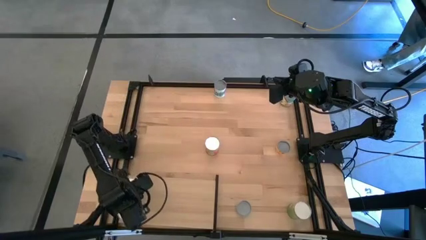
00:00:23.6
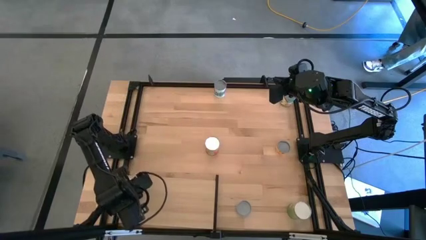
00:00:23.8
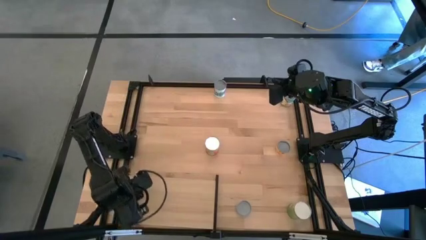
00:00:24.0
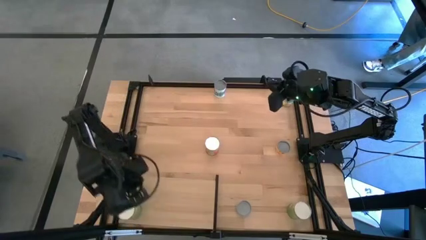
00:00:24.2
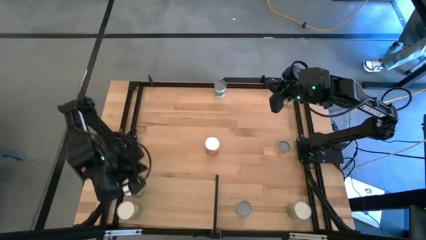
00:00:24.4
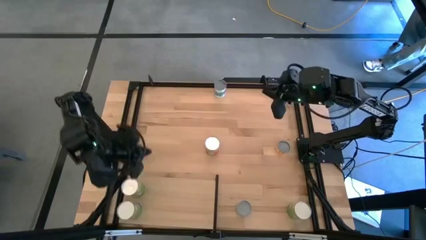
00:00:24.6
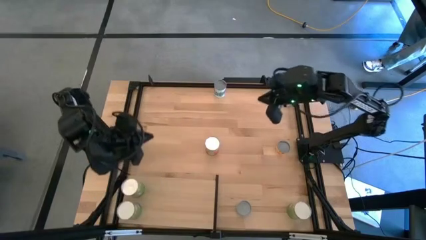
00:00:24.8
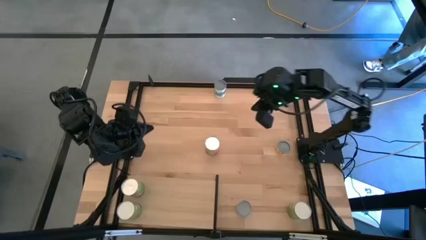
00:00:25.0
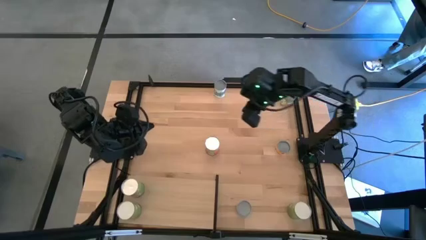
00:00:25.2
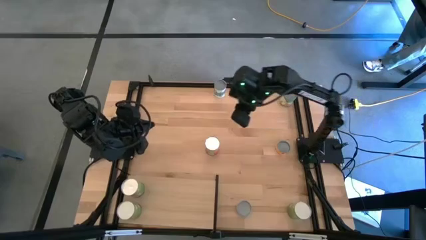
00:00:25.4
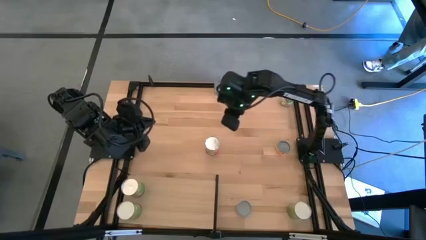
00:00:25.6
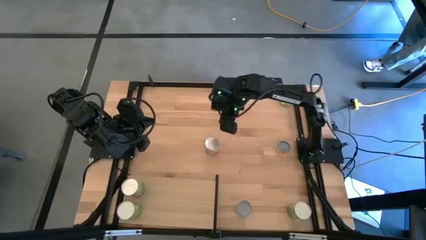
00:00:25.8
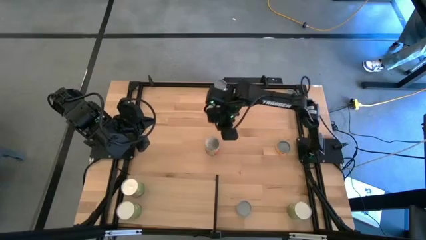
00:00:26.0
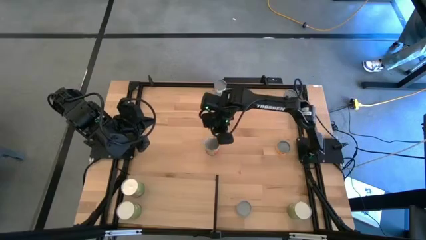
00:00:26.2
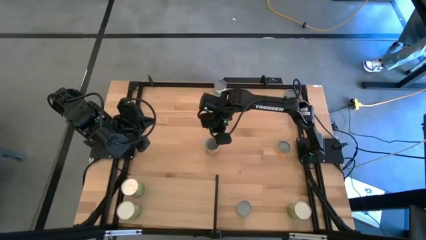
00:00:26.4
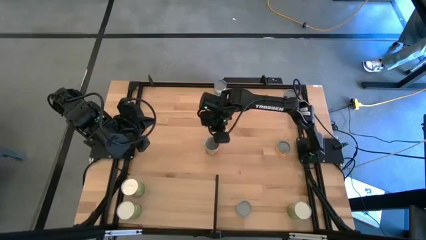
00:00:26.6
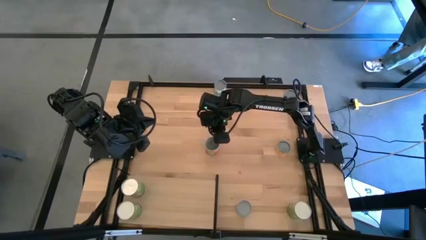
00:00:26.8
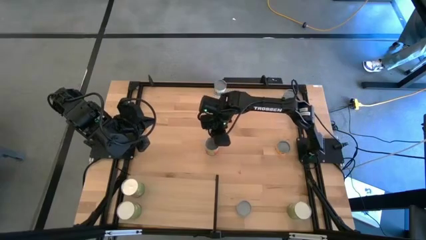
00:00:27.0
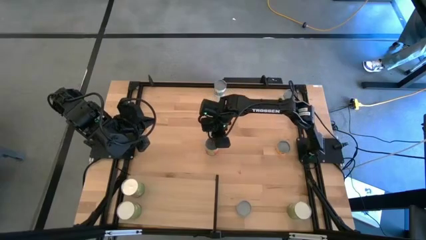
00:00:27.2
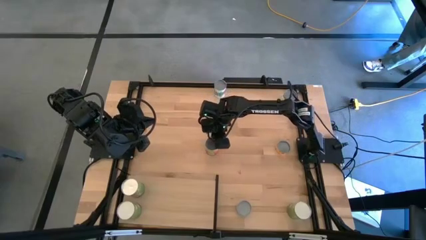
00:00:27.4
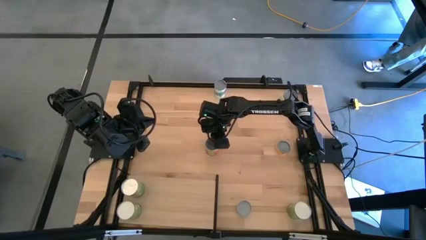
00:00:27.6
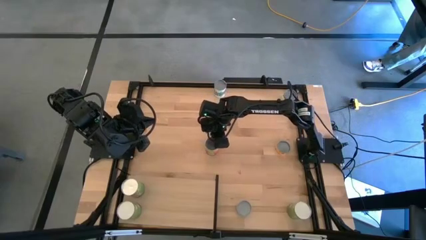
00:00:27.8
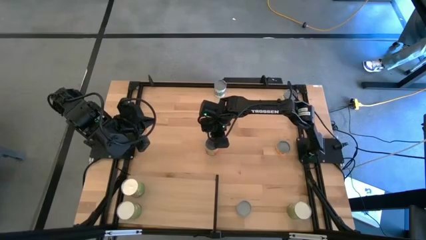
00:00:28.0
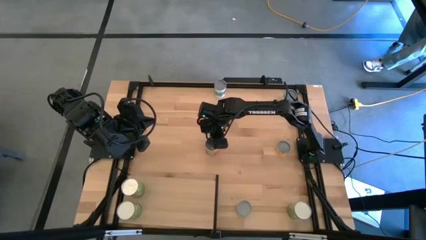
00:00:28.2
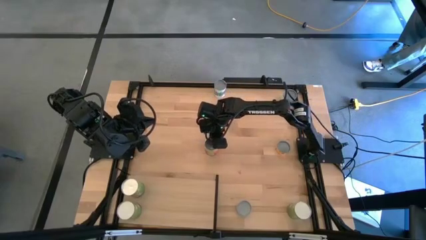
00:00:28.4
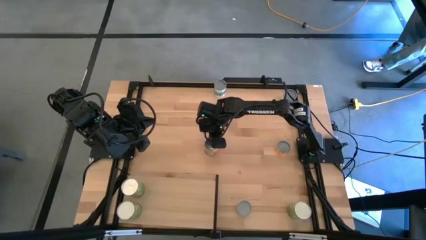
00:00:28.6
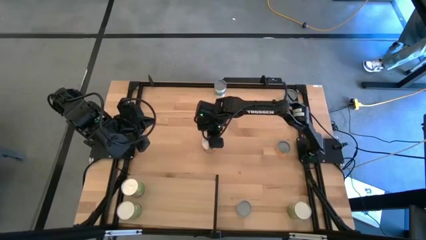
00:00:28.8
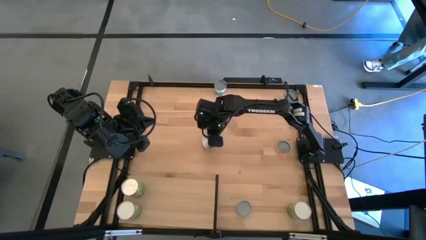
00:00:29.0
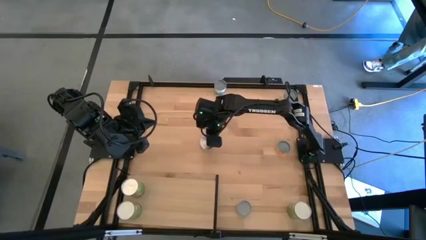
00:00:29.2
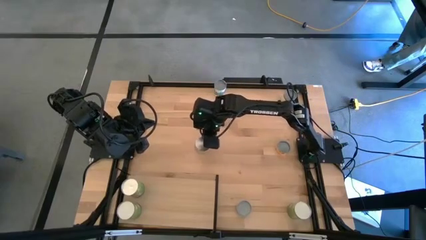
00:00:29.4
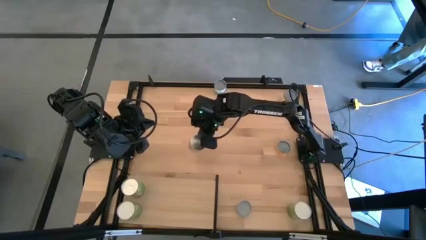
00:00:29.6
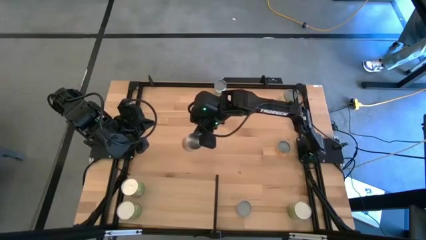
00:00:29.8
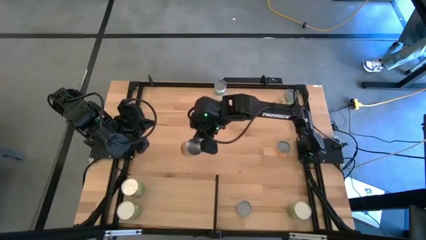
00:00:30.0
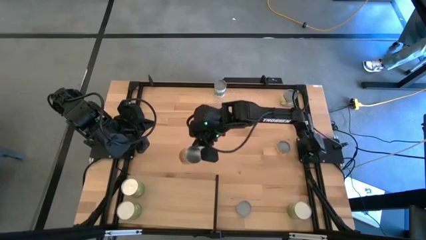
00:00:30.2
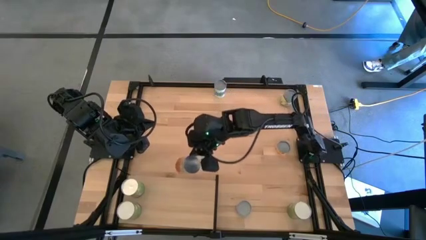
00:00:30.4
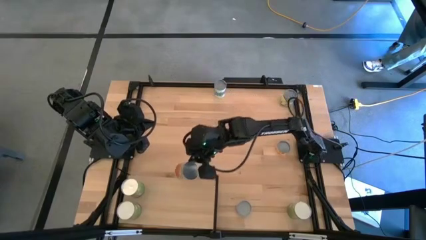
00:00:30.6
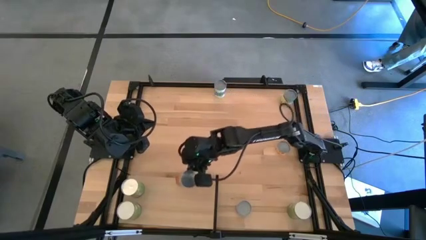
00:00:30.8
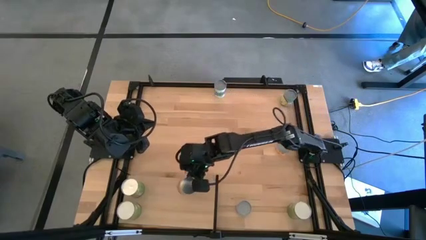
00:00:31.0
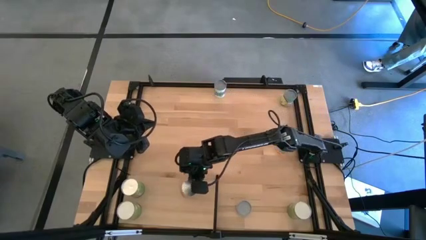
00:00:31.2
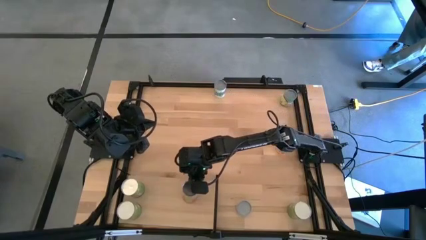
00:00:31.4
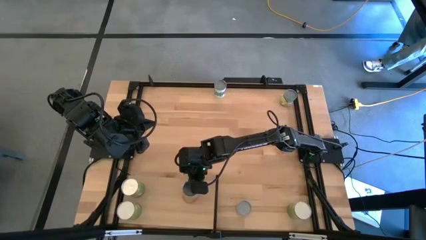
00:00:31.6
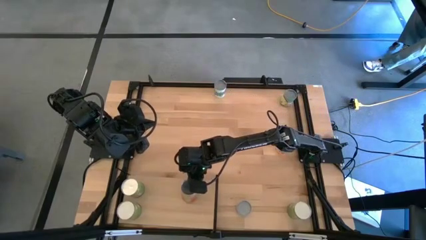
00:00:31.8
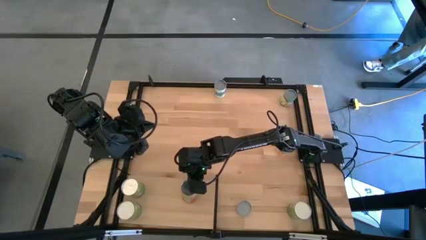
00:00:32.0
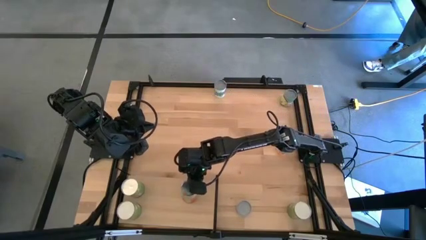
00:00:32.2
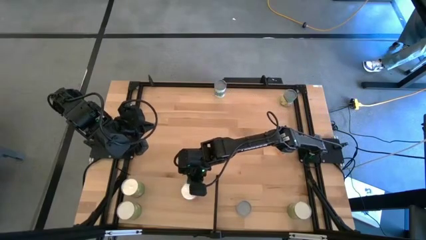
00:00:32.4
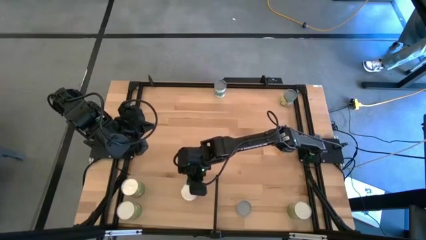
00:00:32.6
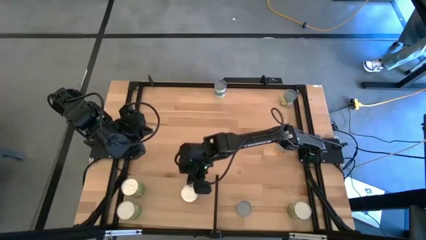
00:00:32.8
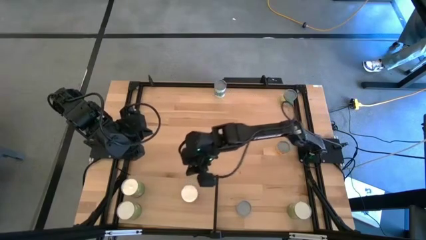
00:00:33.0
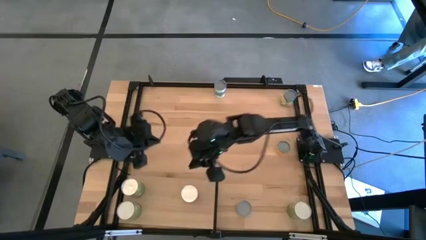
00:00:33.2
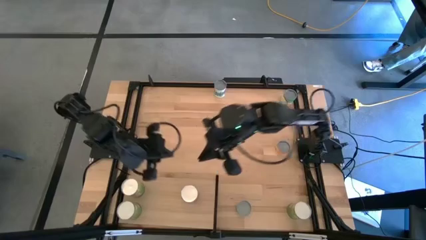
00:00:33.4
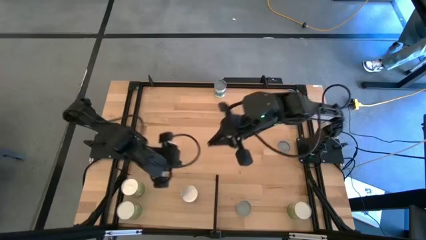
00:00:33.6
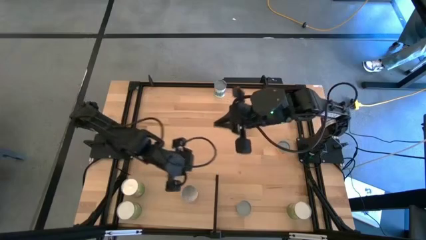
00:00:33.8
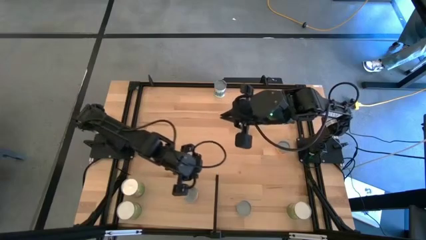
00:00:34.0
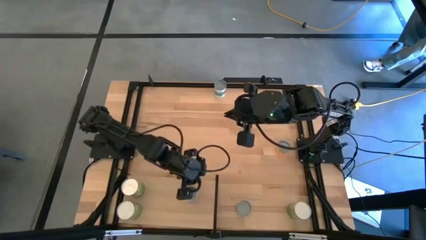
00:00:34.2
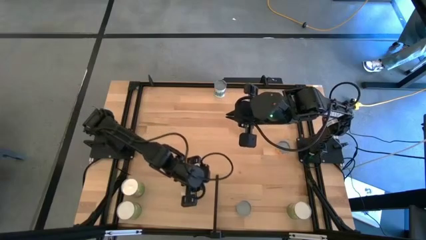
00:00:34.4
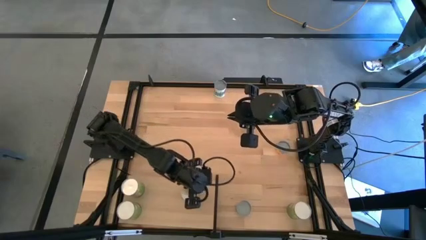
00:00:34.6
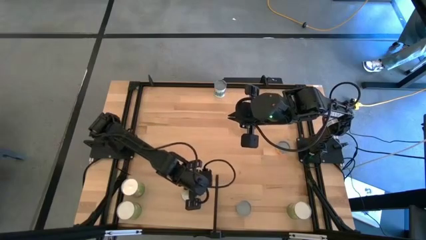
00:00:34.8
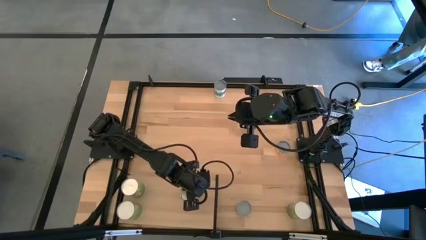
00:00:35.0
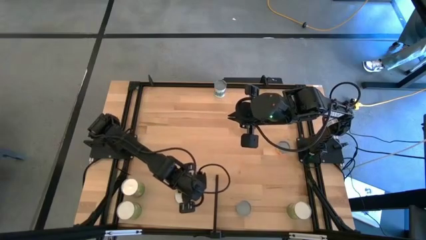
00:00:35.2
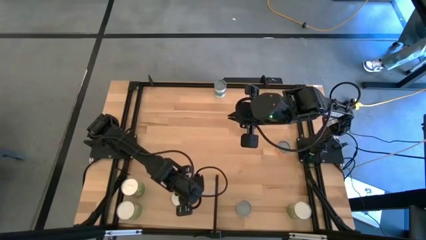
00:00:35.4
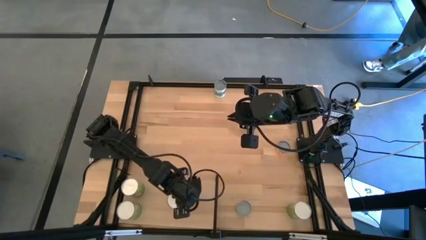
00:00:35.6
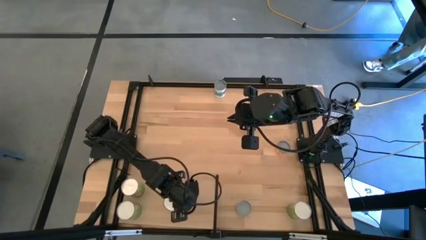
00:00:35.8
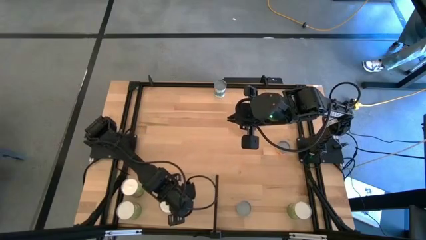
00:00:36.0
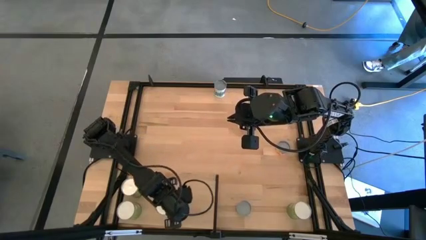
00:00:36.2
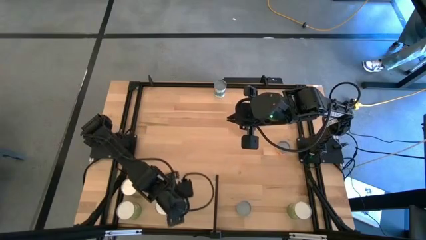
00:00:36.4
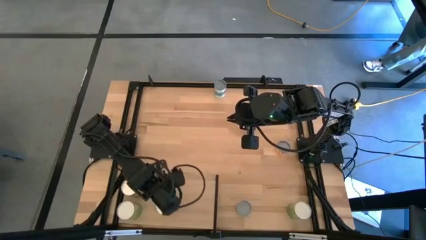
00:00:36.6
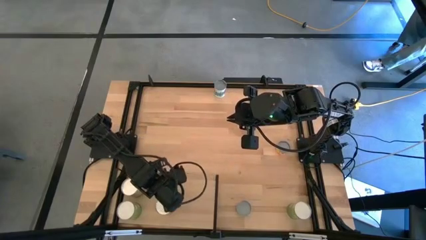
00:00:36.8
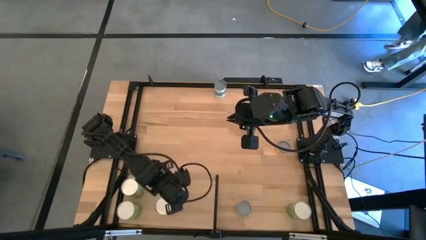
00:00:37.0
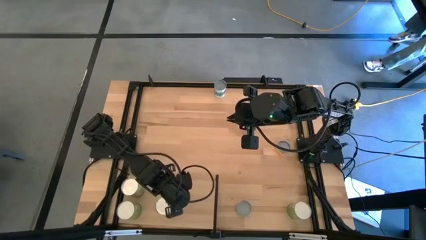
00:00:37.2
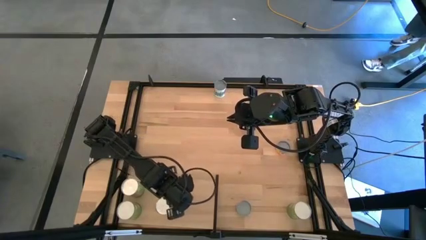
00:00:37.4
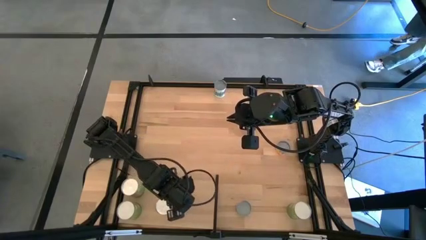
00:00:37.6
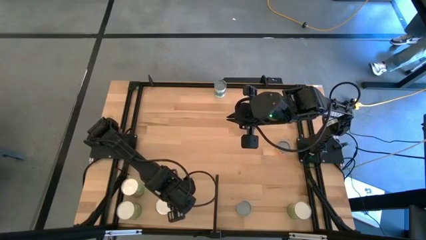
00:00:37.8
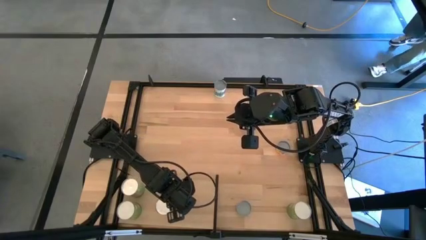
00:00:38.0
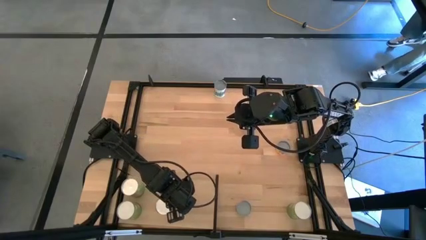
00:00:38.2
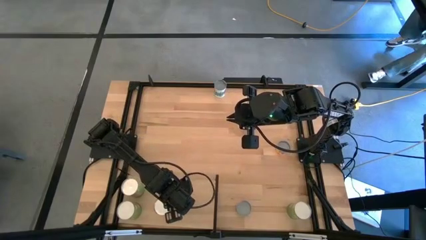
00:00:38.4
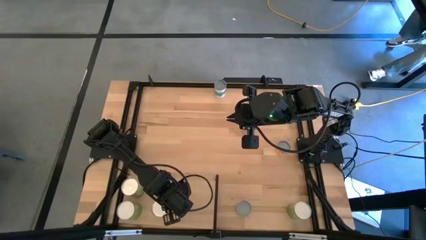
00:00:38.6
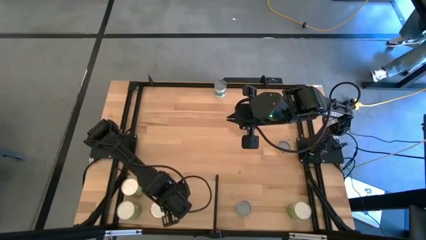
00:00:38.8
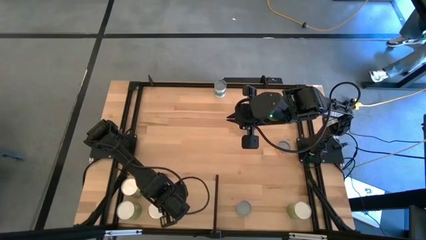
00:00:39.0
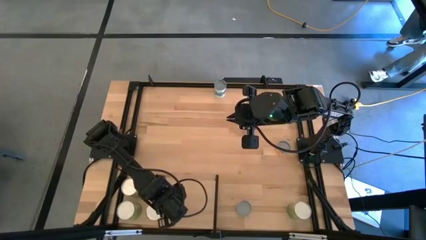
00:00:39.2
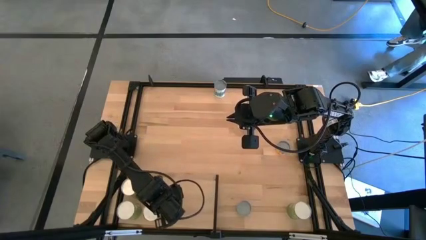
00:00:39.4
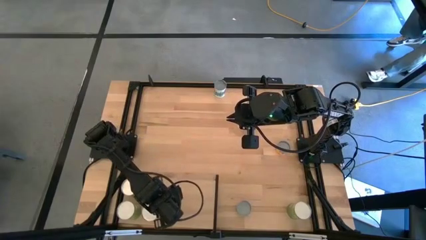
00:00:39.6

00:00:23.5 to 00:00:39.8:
Task: Pick and place cans onto a shelf
Put the canned pineapple on the shelf
